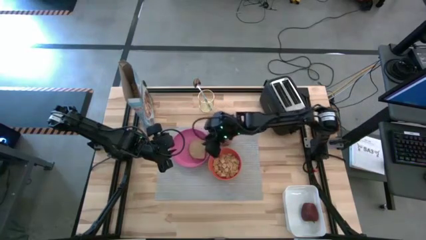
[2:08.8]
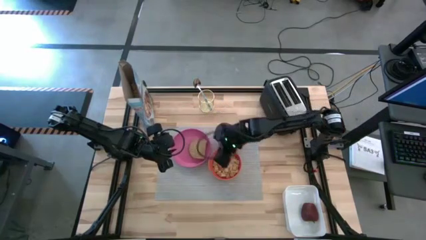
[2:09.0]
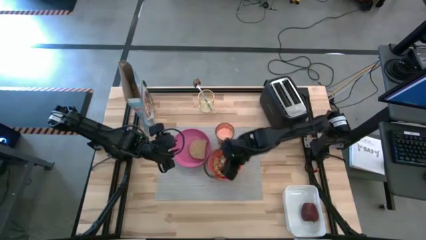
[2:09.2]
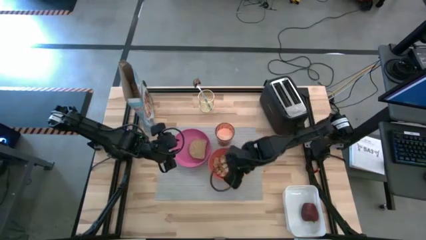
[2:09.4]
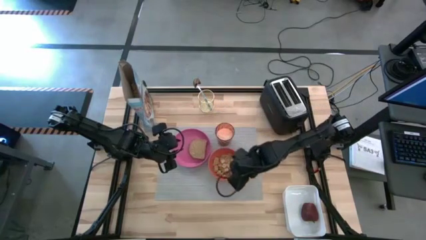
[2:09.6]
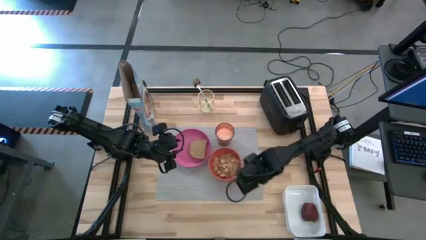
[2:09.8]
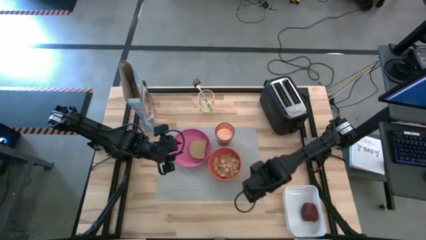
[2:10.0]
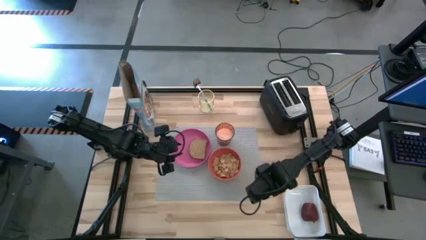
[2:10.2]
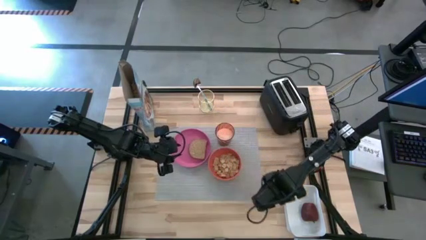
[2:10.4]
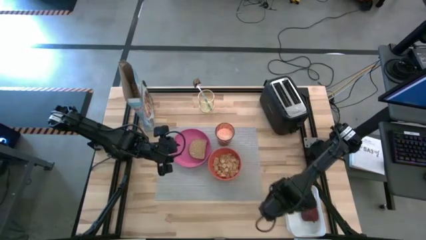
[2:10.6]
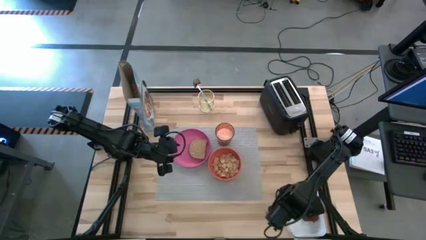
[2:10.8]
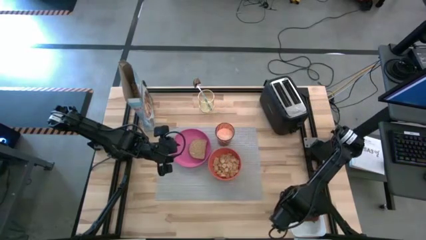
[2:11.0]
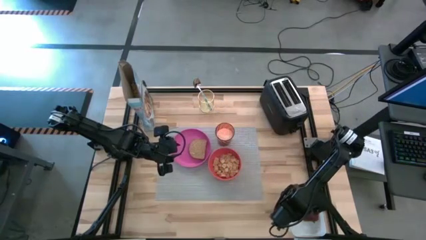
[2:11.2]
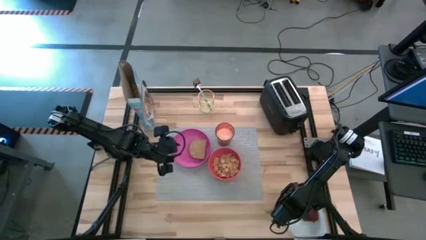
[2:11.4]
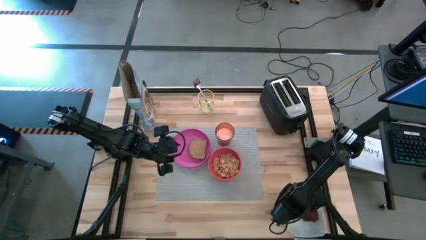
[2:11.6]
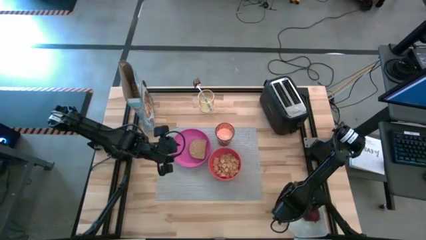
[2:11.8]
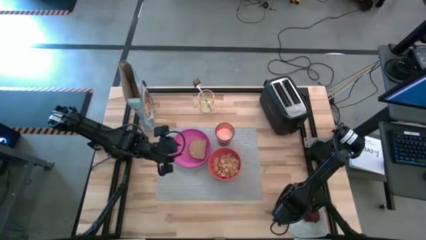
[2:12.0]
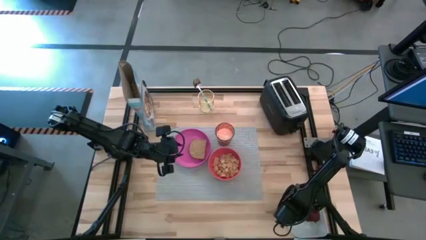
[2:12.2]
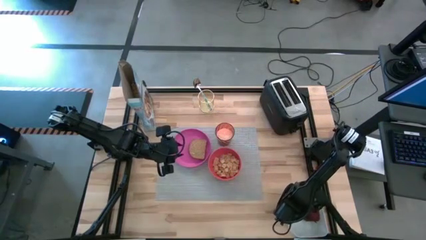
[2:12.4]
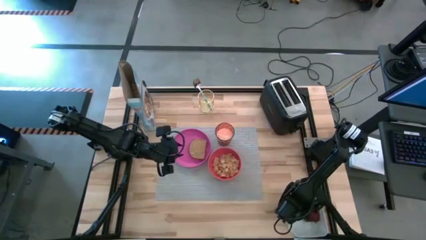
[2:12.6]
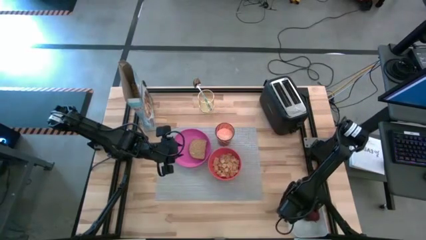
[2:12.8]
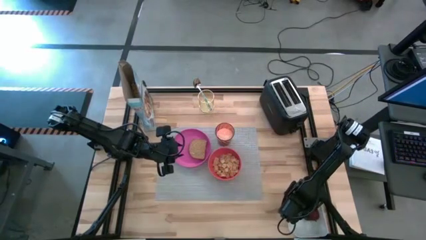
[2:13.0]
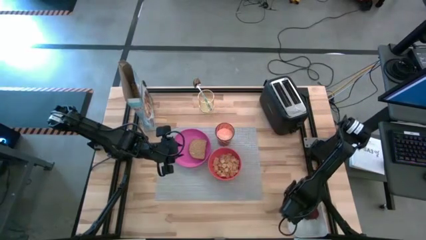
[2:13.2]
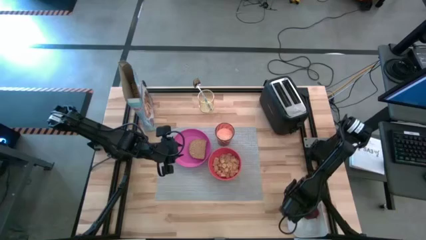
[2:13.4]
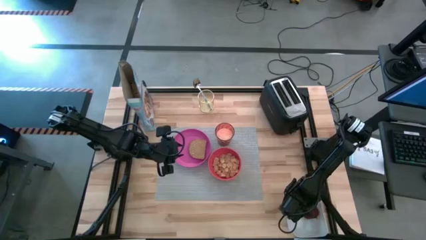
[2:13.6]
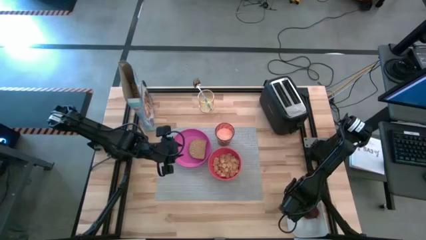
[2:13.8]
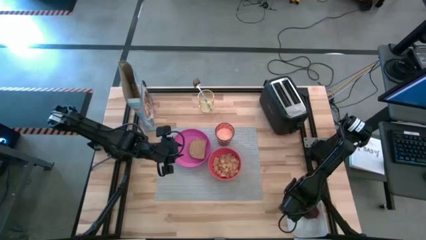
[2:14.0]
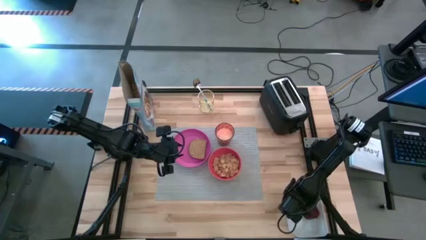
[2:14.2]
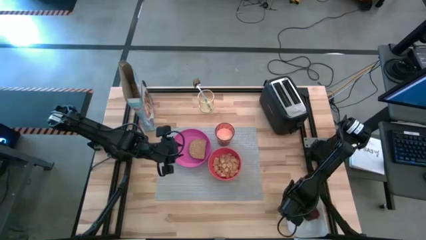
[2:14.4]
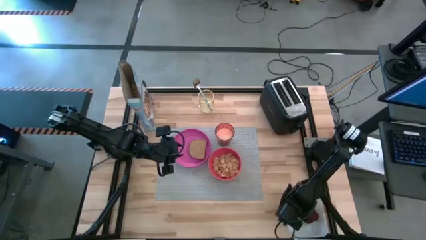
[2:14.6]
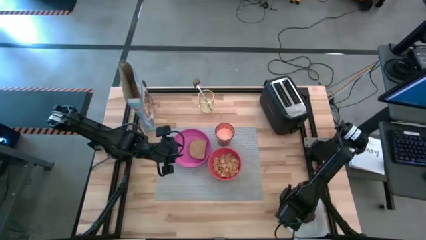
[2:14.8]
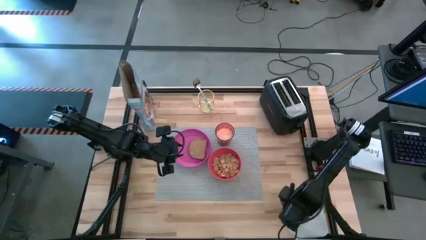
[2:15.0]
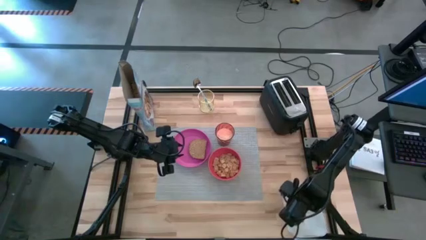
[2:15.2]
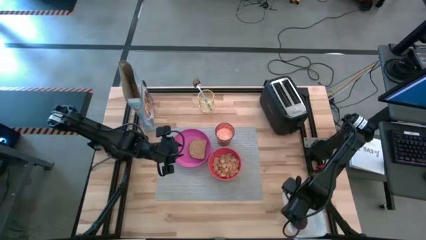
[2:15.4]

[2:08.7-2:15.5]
Task: Arrange a breakfast setting
Put the red apple on the grey table mat to the top right of the orange bowl

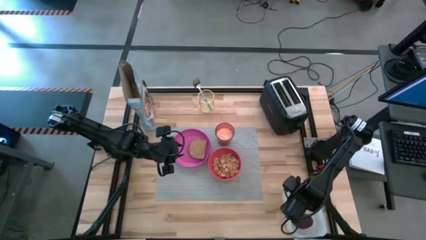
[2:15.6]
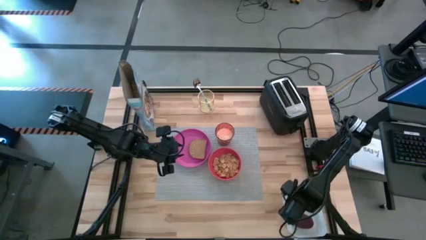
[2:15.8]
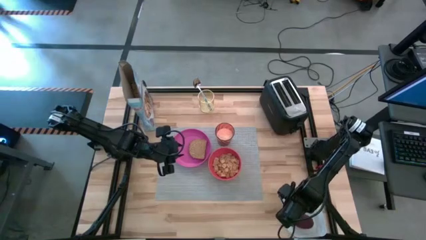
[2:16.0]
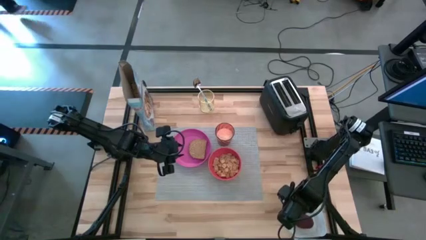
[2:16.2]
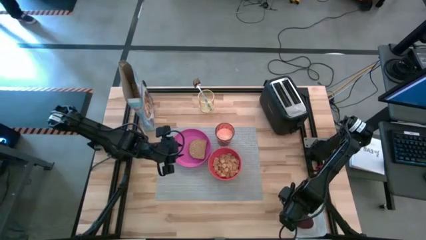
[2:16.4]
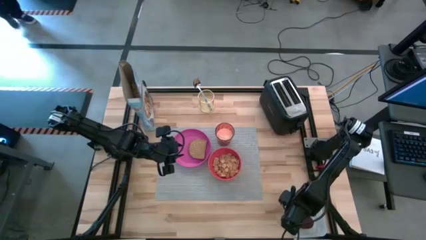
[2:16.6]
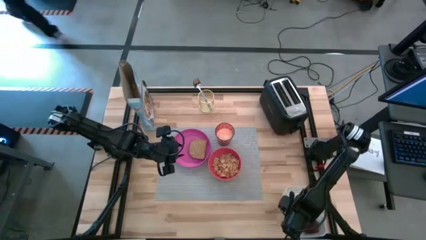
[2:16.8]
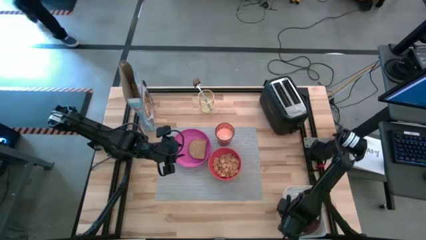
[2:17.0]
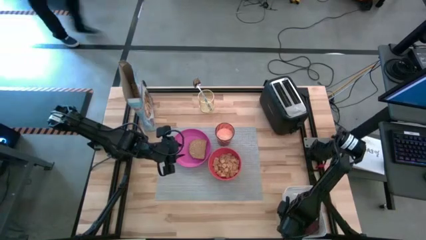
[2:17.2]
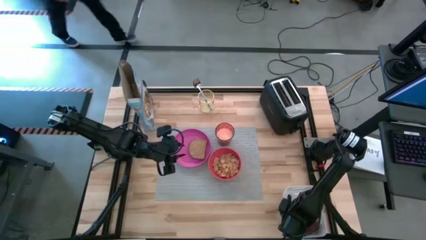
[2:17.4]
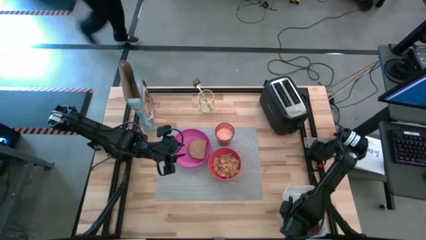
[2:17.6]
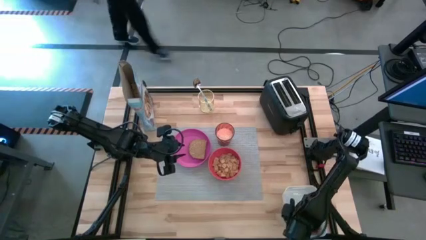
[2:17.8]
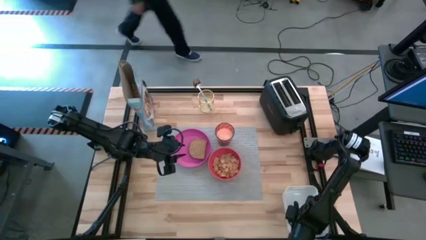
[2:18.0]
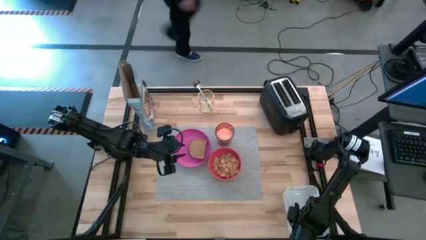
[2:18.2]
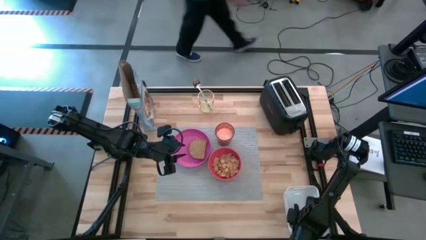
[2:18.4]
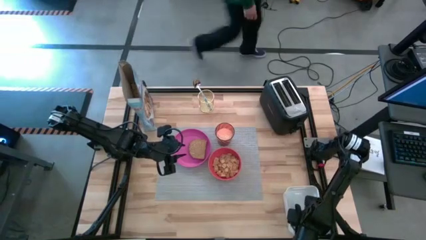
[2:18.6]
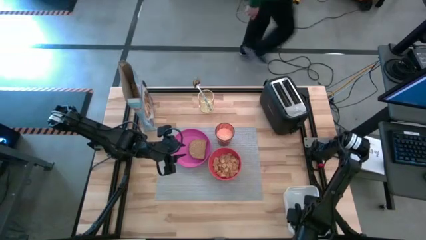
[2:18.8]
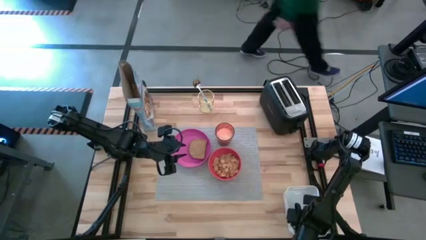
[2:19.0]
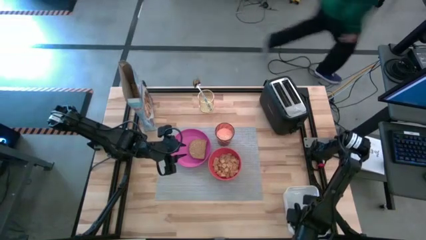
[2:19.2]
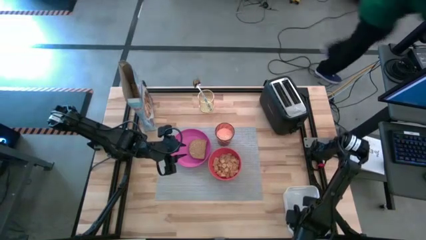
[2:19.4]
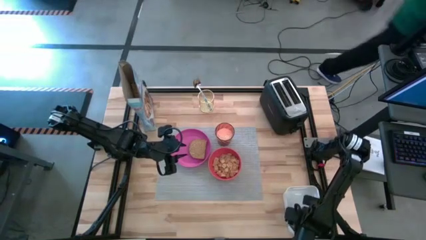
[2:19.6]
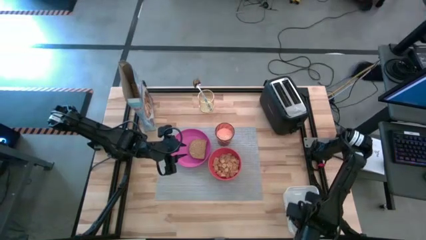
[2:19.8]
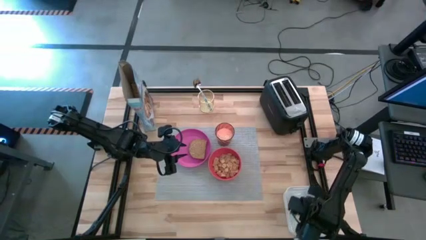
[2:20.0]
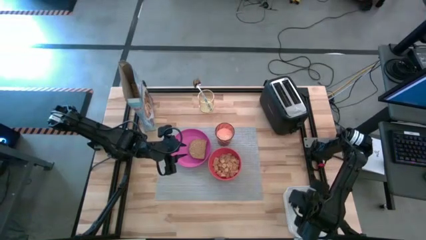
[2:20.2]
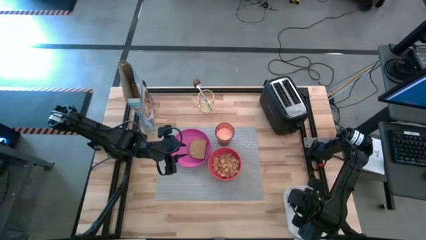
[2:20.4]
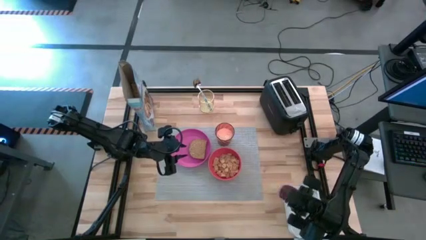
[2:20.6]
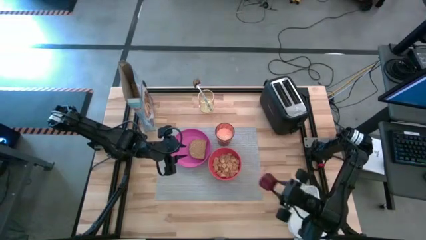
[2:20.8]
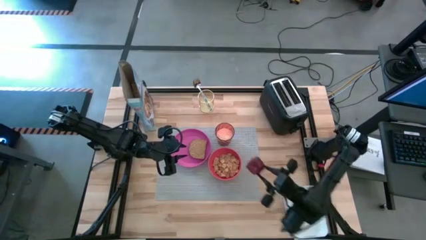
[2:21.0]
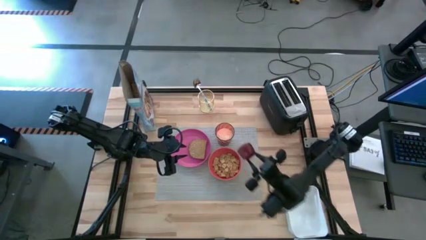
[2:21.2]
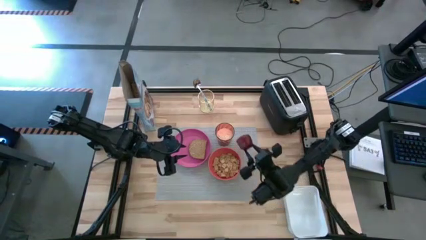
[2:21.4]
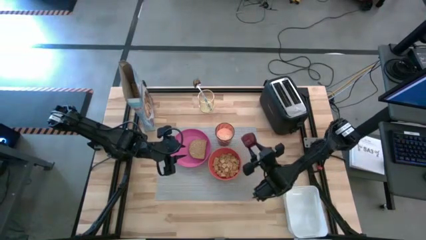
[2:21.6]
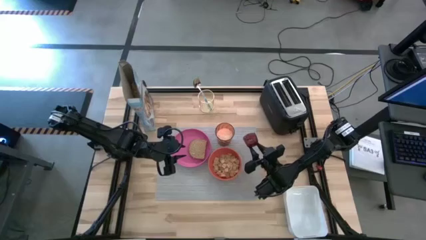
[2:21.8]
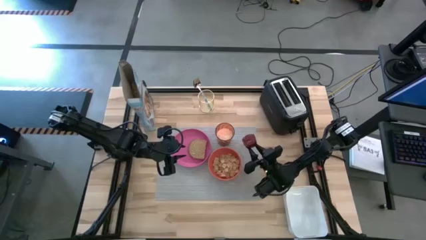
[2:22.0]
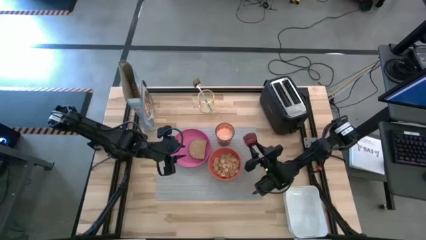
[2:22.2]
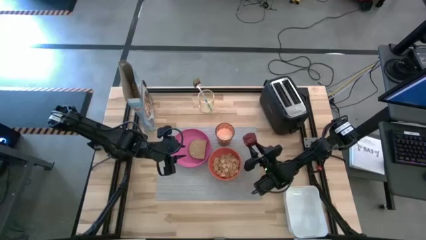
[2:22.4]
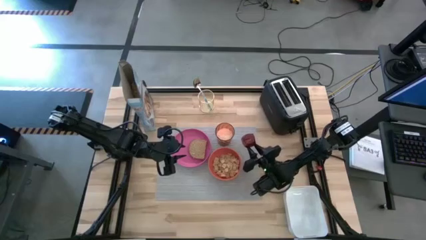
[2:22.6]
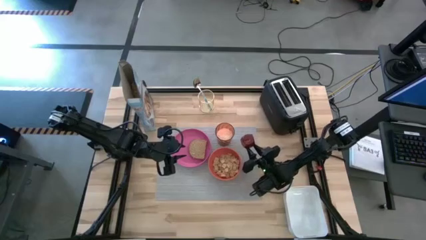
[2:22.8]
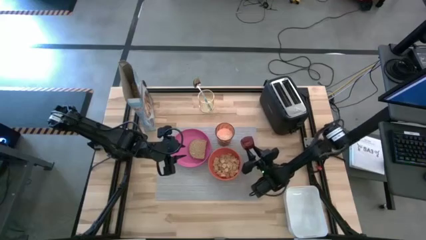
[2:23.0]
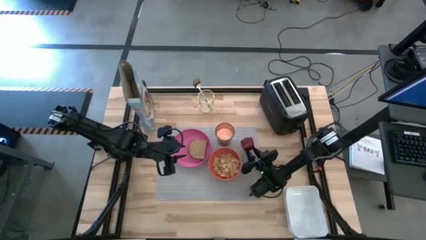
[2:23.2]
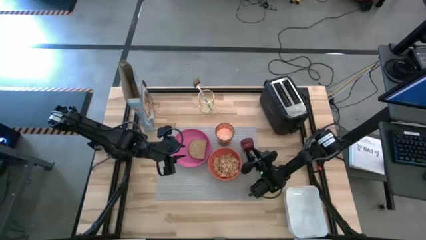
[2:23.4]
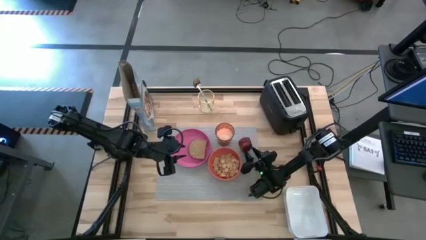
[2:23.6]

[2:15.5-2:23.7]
Put the red apple on the grey table mat to the top right of the orange bowl

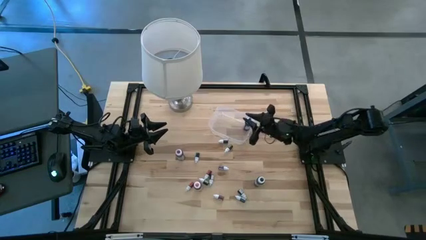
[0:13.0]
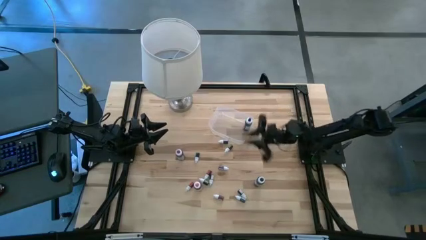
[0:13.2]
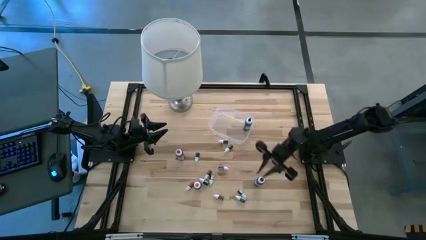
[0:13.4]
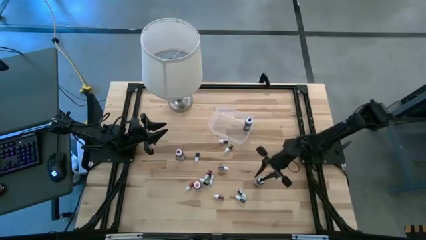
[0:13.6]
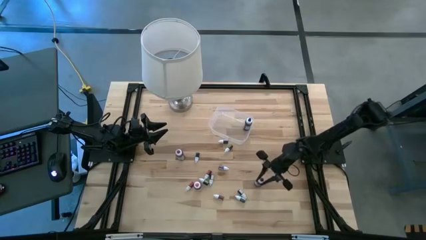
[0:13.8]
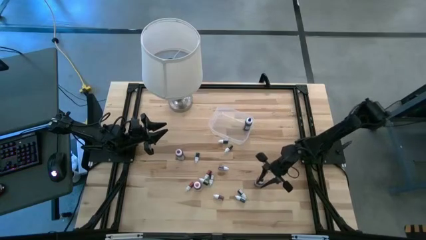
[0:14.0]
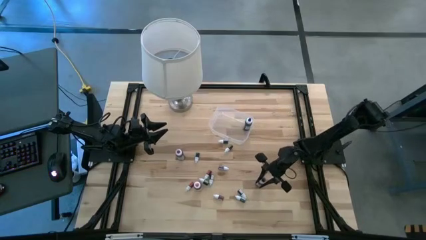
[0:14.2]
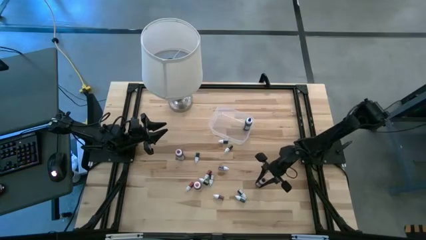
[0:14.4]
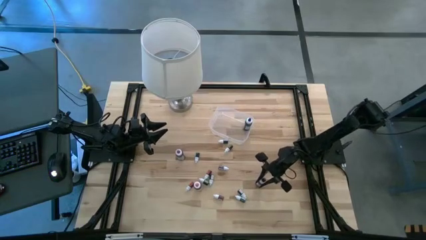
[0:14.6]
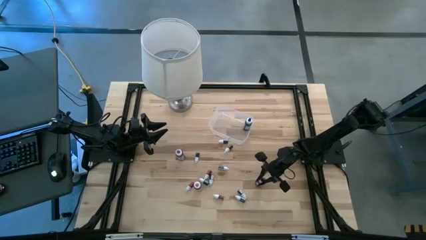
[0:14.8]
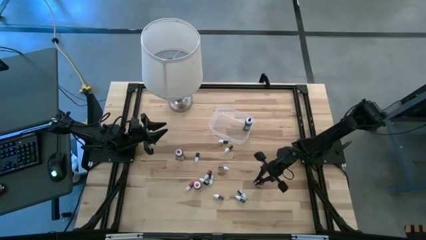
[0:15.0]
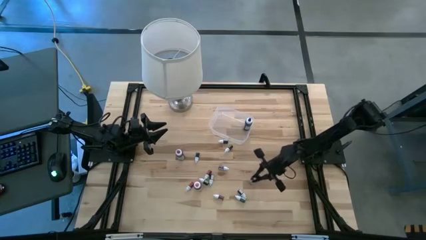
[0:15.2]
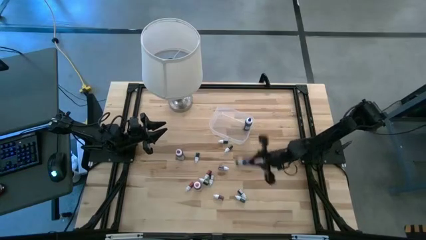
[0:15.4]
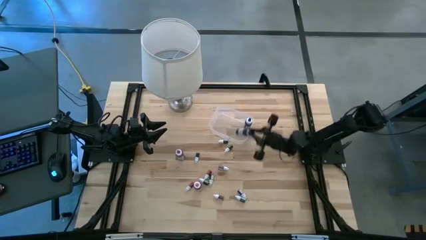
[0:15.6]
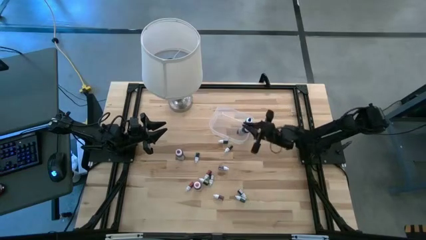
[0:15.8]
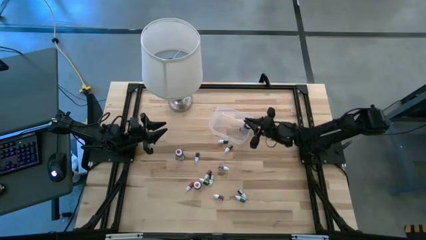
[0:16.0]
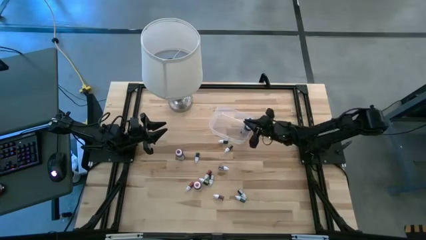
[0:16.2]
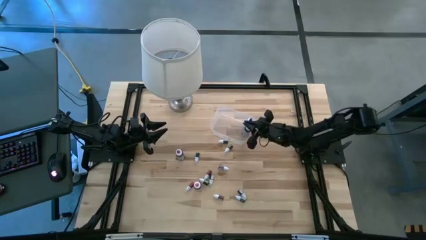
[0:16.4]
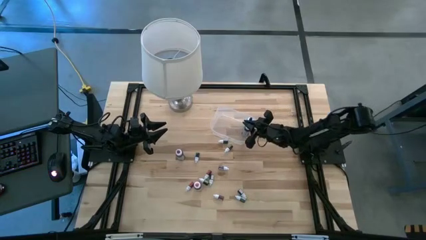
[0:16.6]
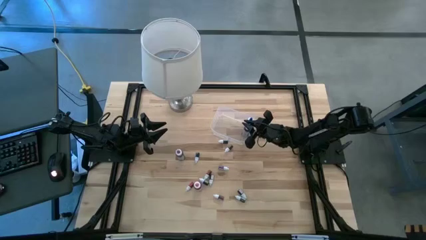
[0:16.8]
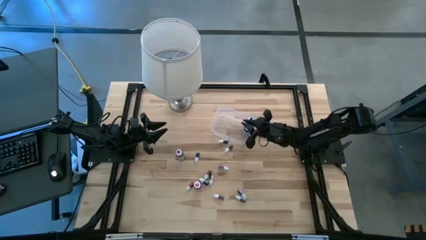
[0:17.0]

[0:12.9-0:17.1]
Task: Pick & Place food coloring
Put the large black food coloring bottle into the transparent bin
